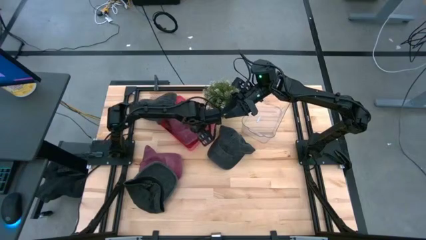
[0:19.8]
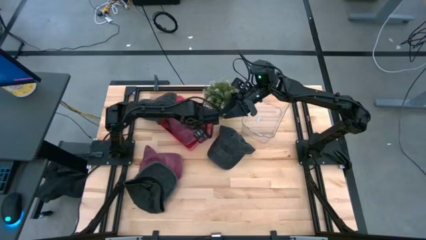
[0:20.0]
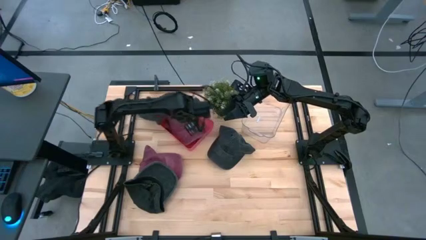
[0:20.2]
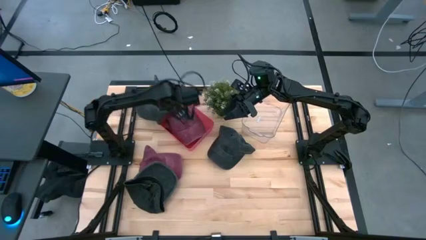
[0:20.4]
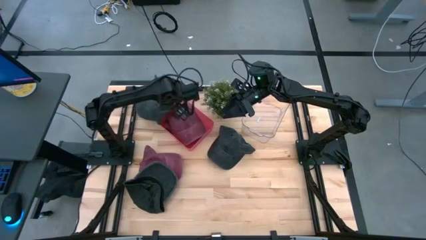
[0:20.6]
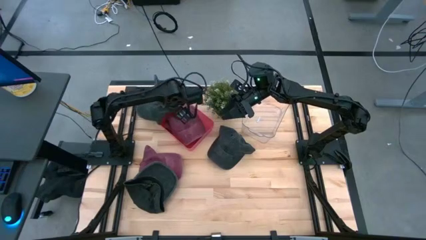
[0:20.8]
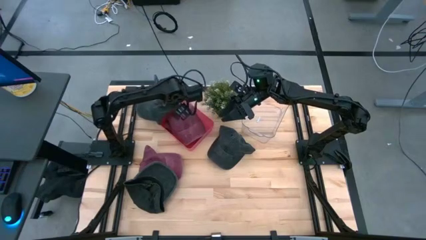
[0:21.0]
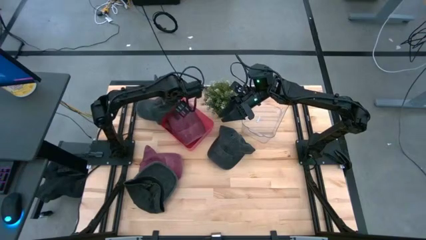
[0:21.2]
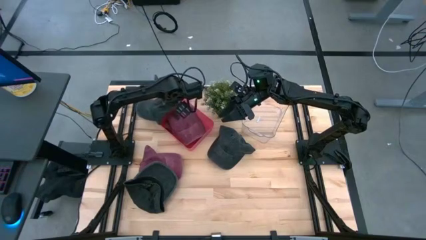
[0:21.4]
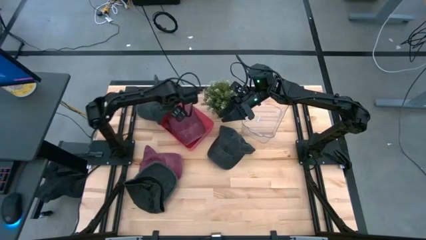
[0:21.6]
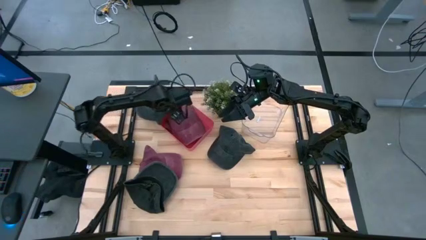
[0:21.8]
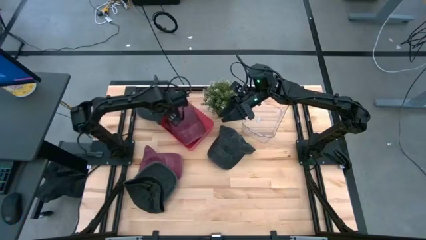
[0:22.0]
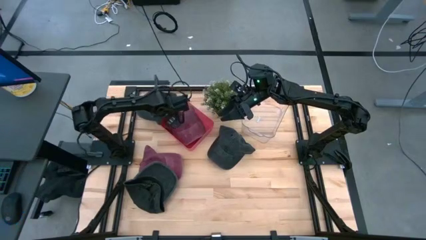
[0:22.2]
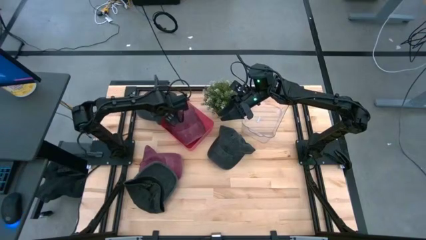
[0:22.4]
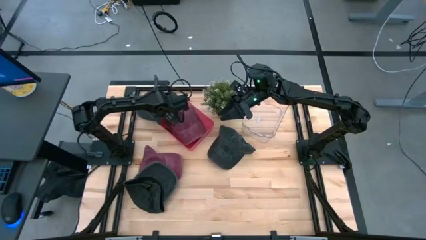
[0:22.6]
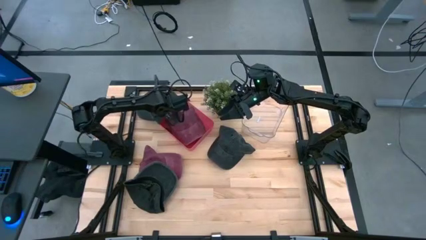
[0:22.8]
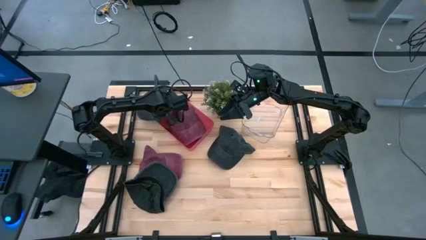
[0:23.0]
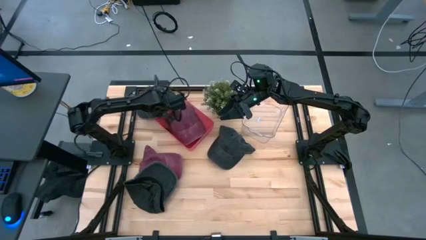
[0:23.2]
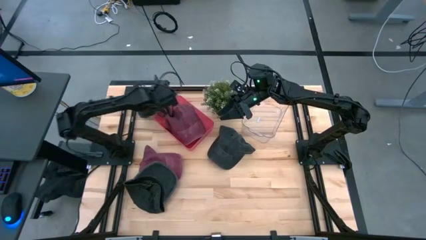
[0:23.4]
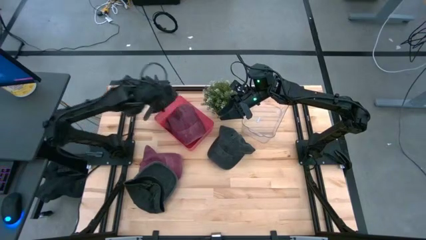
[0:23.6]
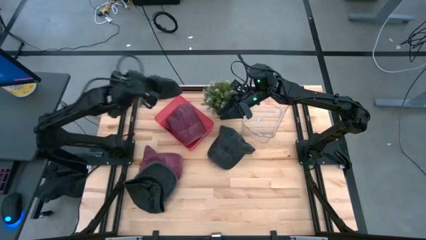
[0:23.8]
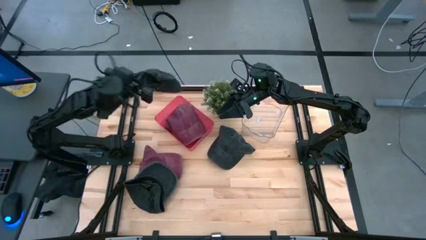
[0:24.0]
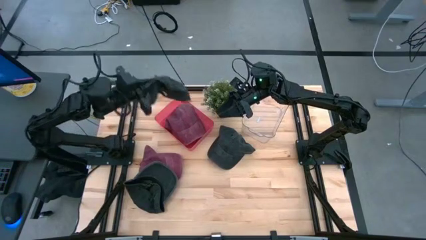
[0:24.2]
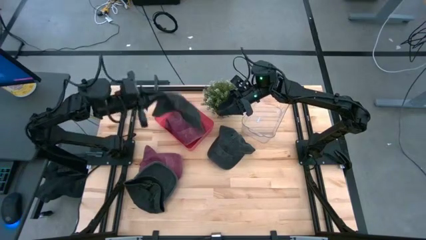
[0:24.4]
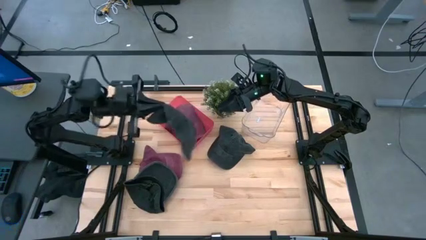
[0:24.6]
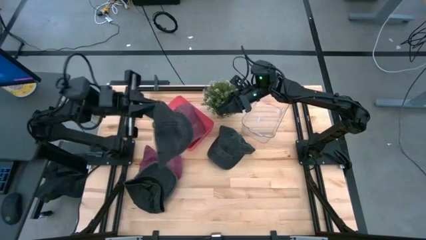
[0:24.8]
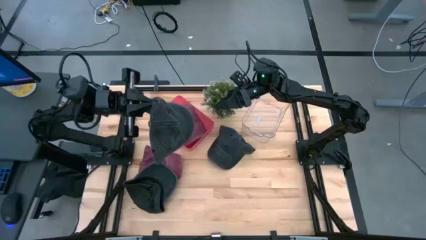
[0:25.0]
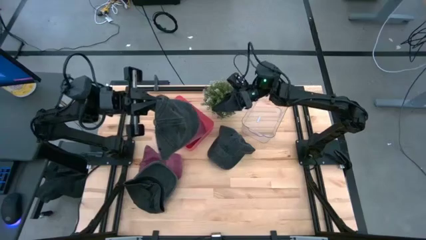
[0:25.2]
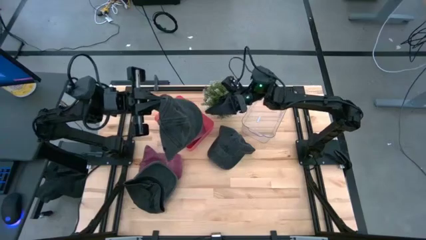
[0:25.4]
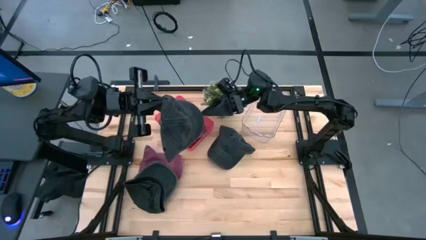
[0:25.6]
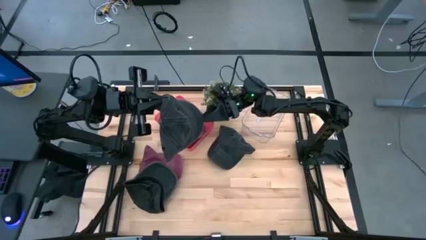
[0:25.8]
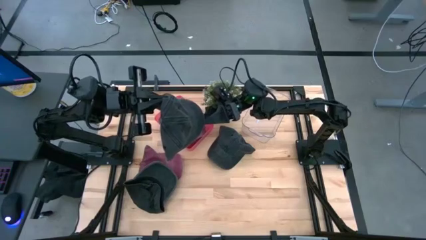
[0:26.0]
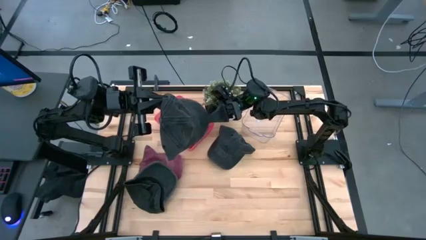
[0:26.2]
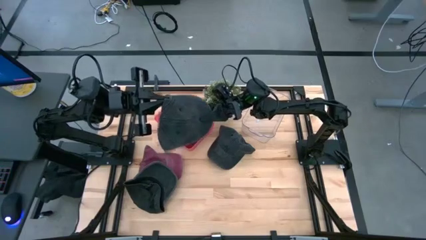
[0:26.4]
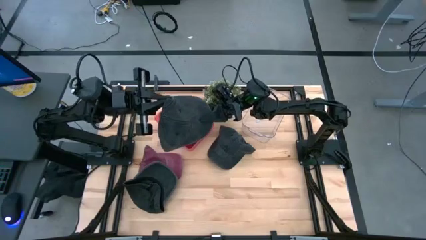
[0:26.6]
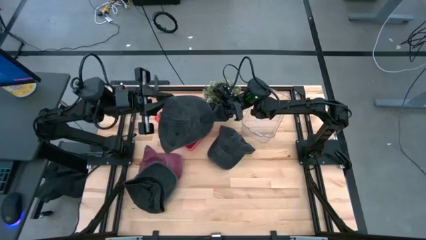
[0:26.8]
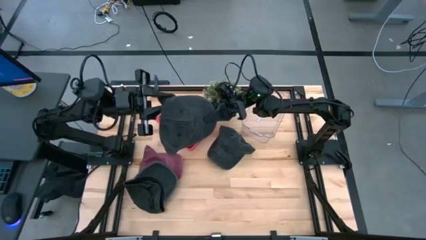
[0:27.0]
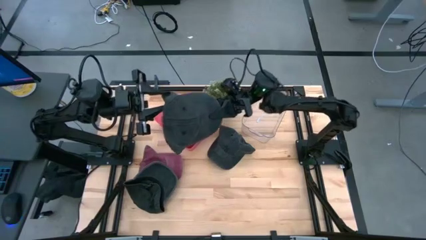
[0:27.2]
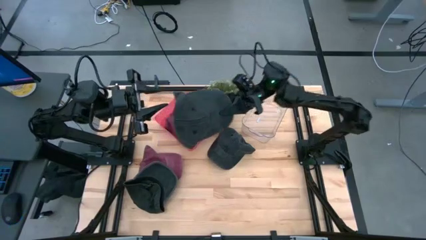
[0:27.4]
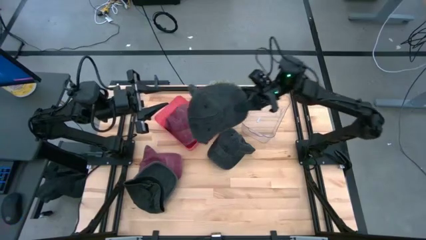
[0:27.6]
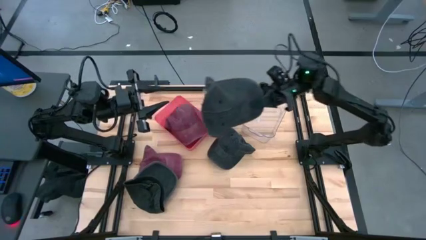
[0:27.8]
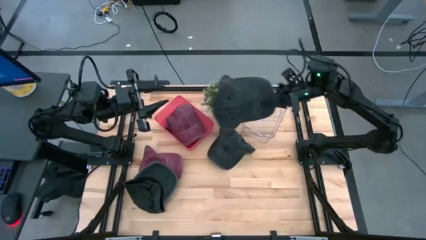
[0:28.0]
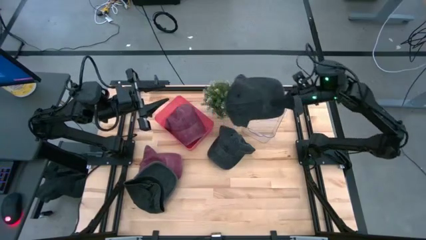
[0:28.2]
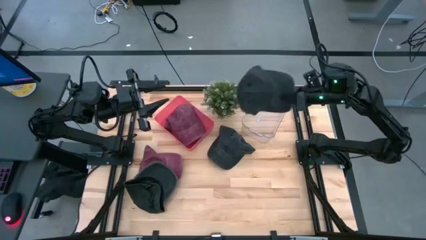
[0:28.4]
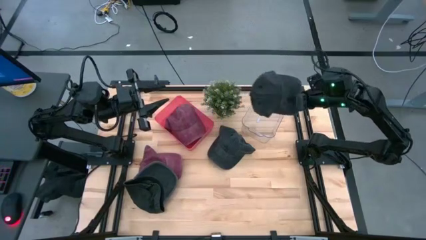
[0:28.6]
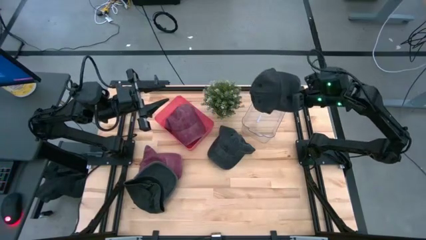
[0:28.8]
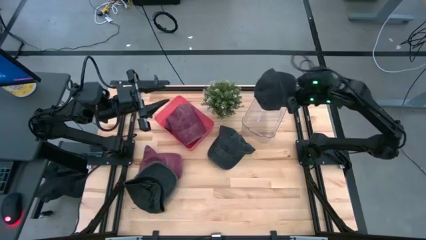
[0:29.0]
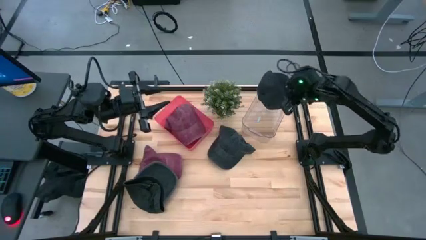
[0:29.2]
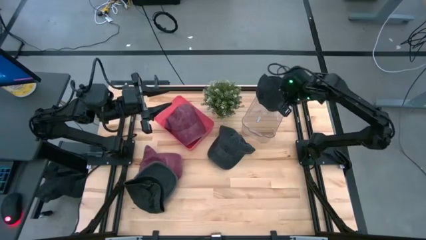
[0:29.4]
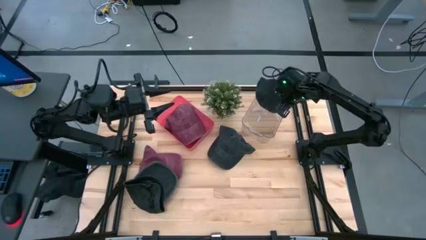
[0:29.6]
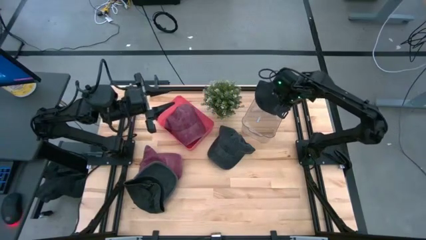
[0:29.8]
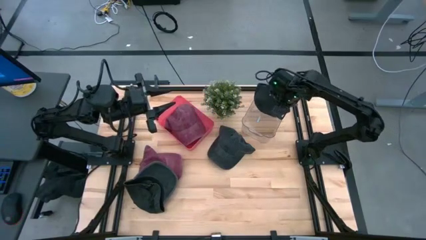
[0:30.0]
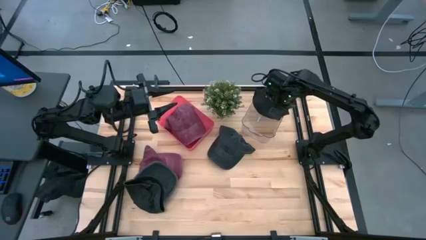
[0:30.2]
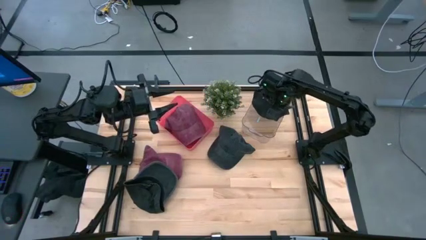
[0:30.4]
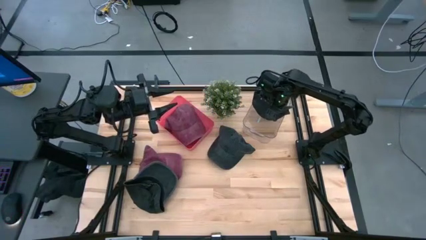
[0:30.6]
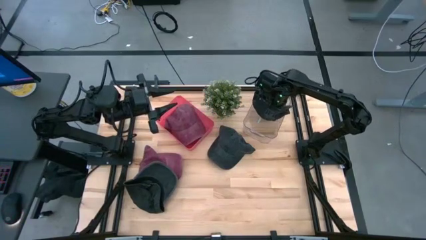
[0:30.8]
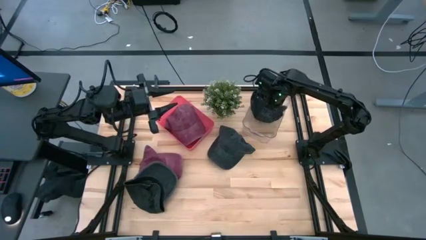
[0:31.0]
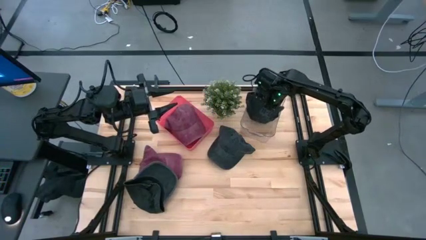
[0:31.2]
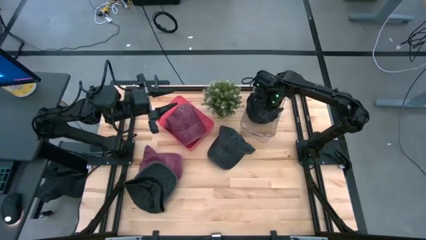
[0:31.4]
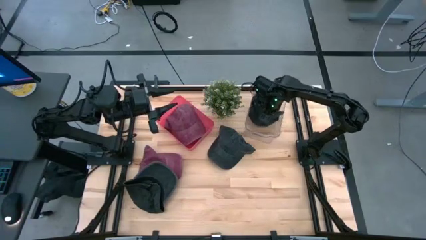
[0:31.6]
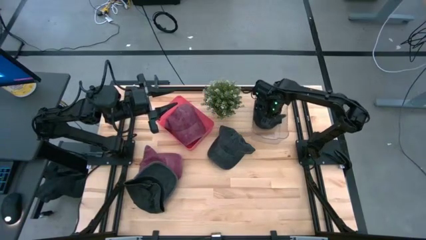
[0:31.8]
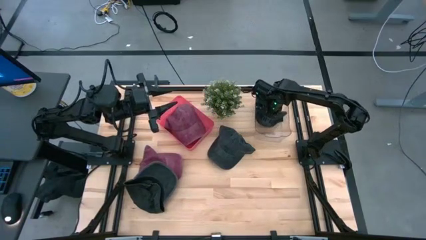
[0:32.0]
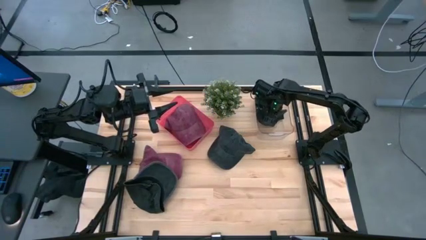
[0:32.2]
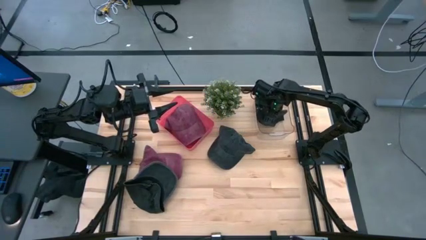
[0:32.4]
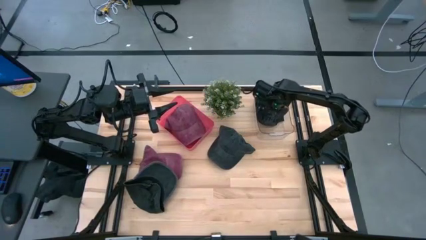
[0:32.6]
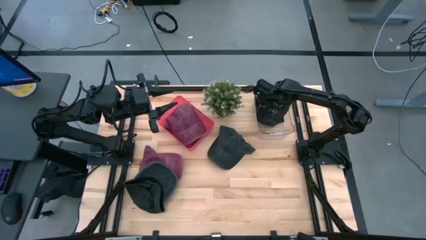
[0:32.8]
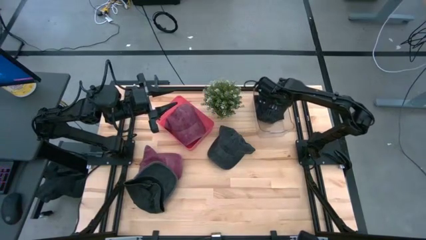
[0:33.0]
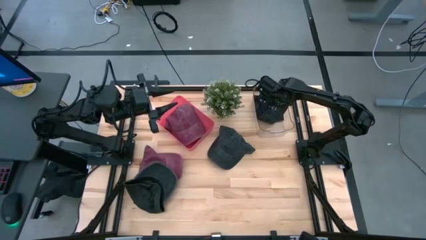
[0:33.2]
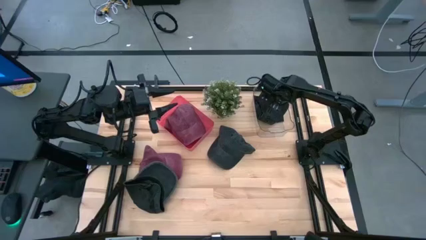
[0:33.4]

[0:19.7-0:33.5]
Task: Pick & Place hat
Put the top left black cap into the transparent bin
